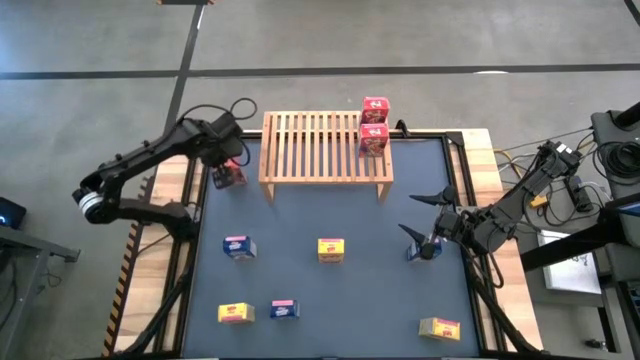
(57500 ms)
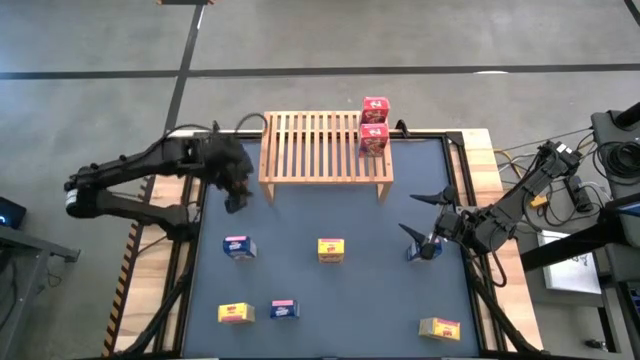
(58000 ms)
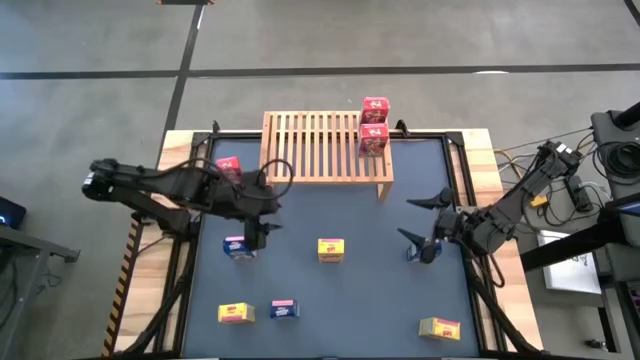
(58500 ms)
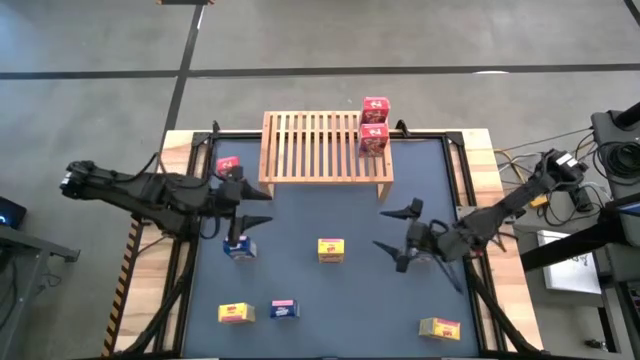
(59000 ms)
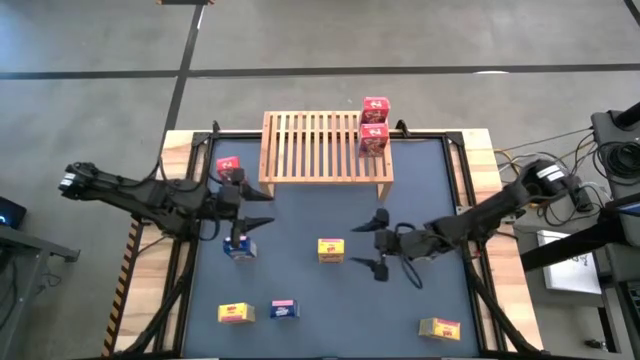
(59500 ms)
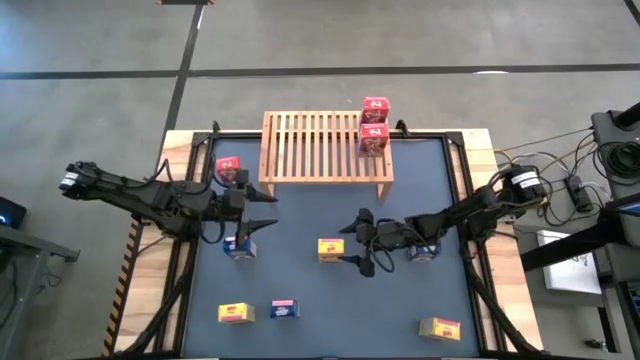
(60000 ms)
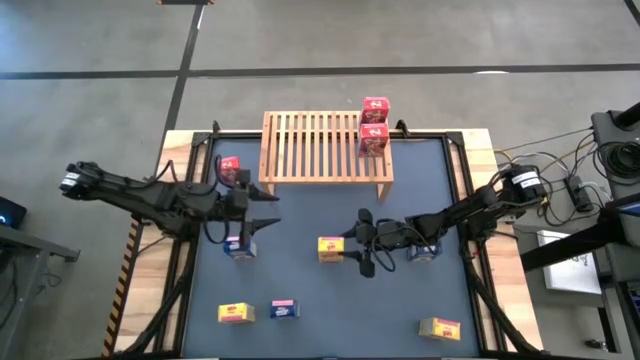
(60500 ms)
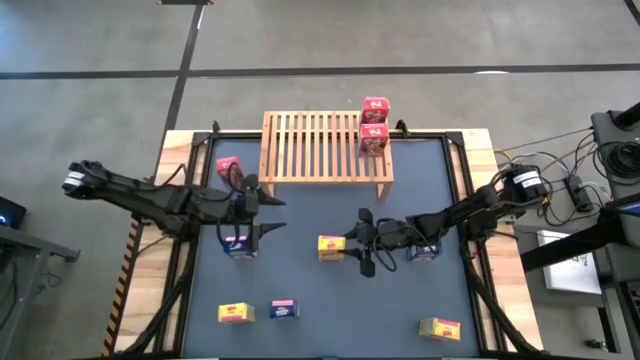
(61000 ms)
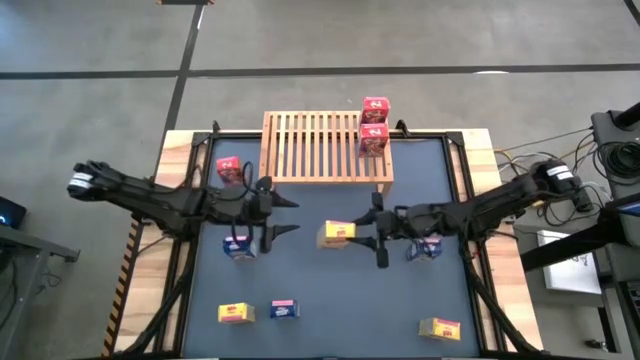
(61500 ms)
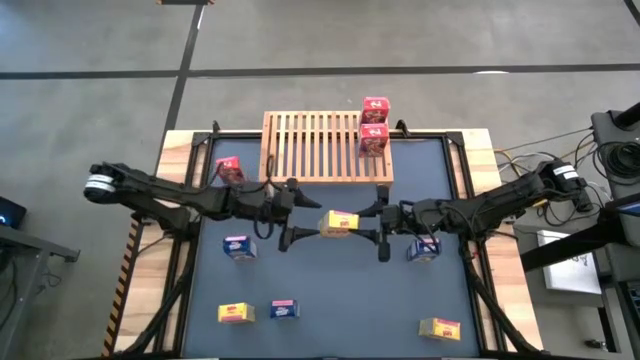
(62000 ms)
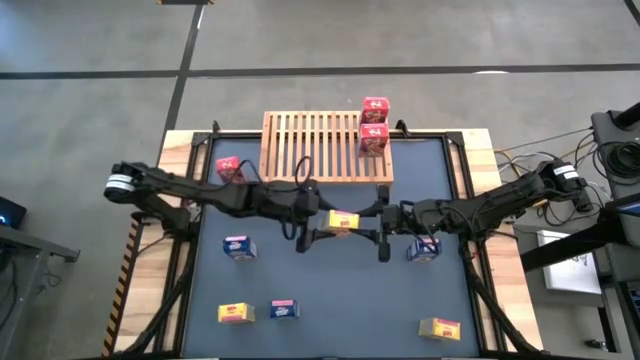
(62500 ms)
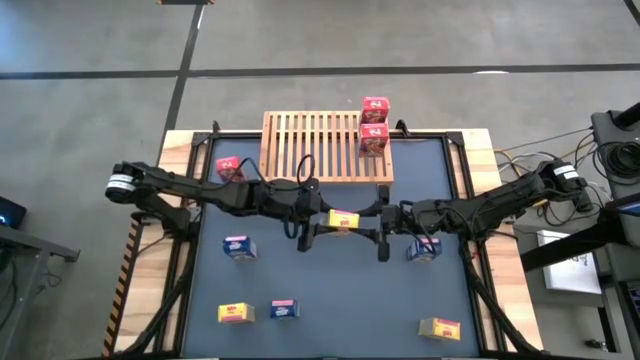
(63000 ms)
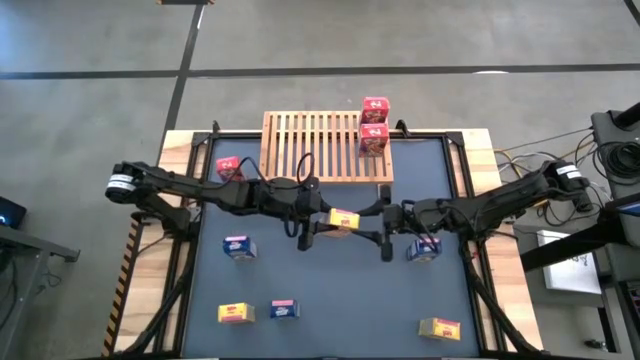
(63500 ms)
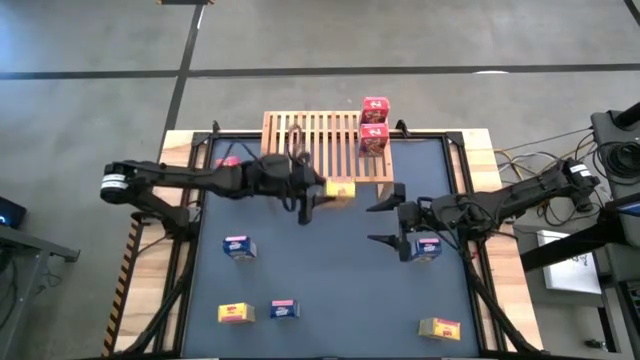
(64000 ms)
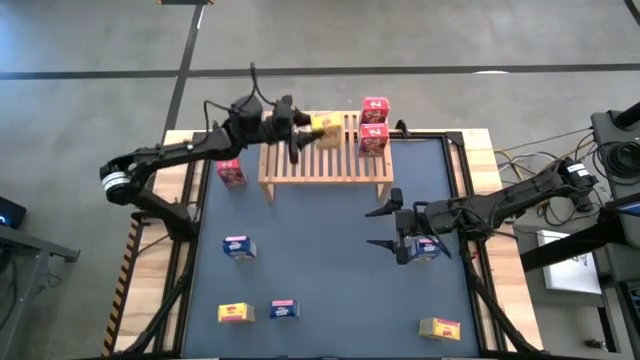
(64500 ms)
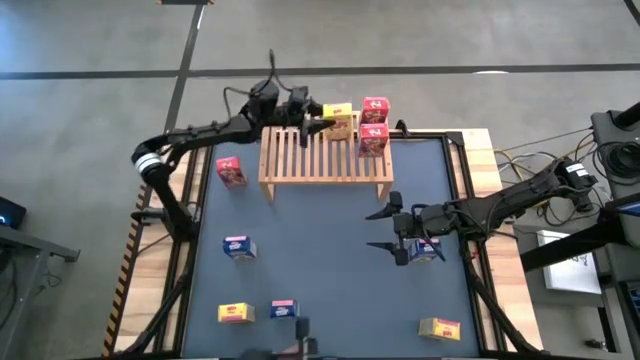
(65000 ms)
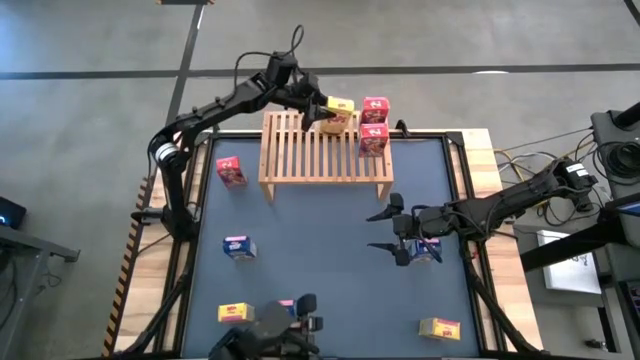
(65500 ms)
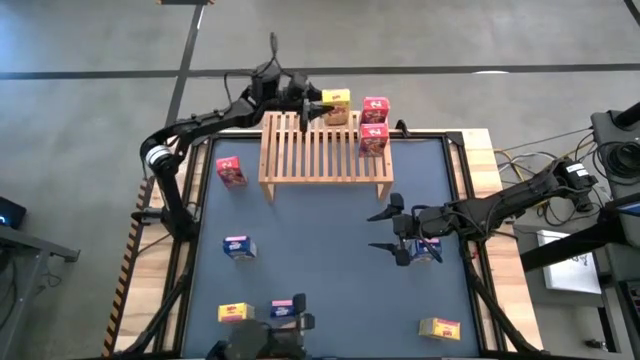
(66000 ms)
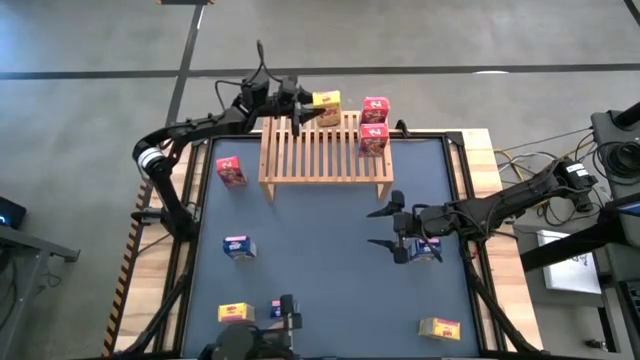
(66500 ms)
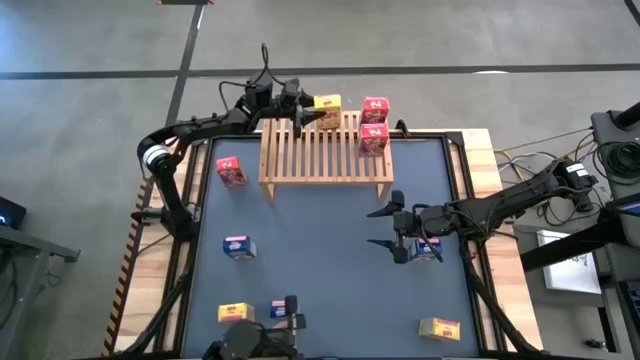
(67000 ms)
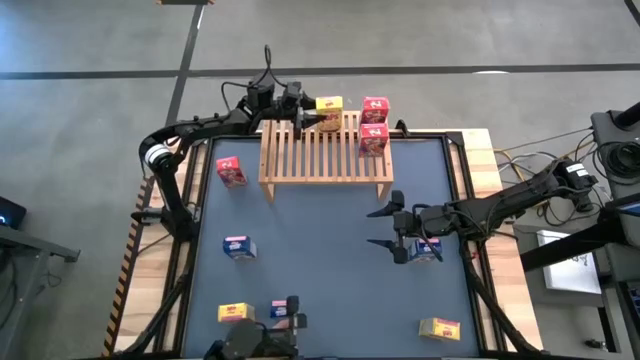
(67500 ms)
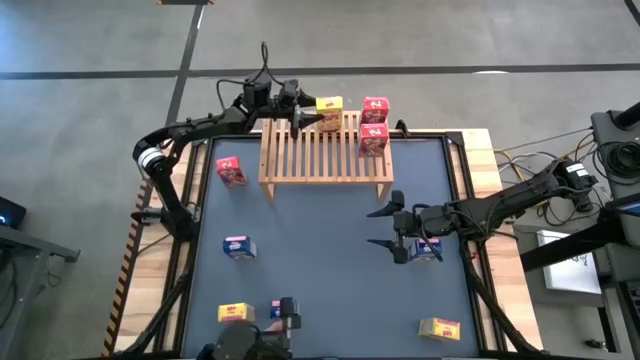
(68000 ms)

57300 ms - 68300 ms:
Task: Stack cereal on shelf
Put the top yellow cereal box on the shelf

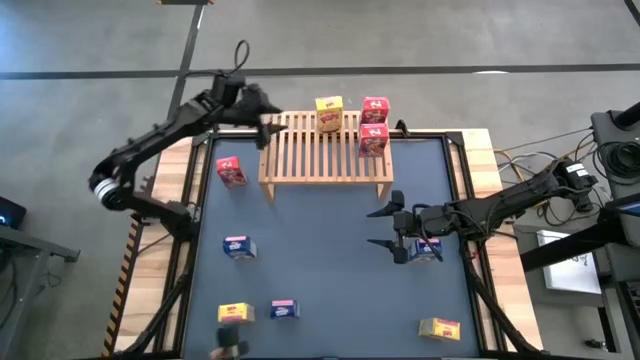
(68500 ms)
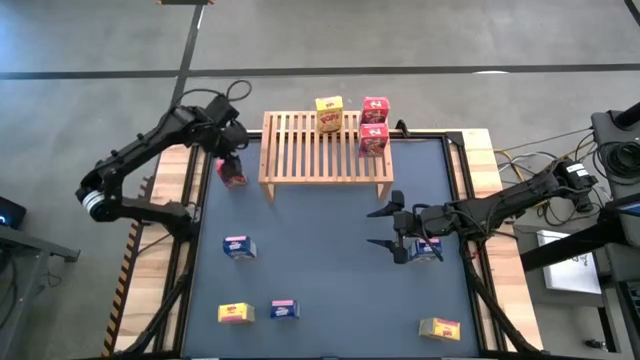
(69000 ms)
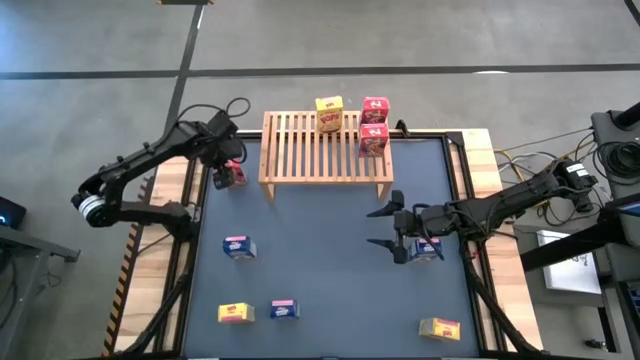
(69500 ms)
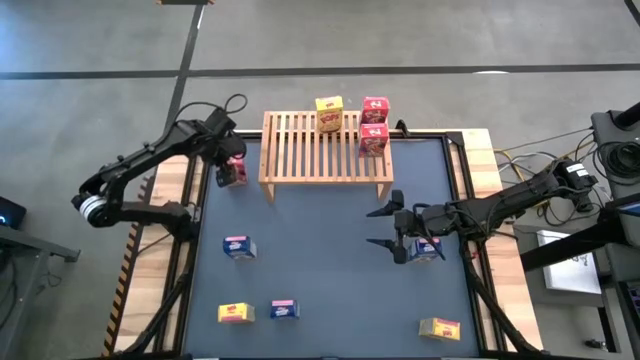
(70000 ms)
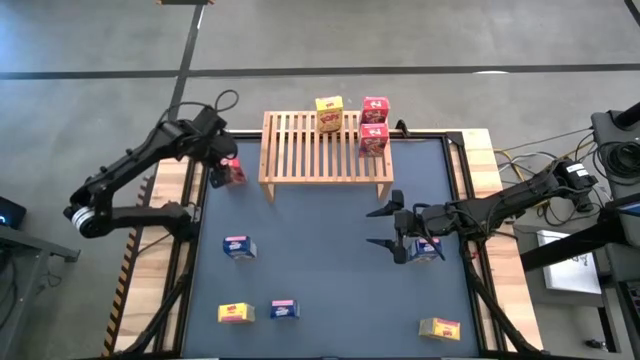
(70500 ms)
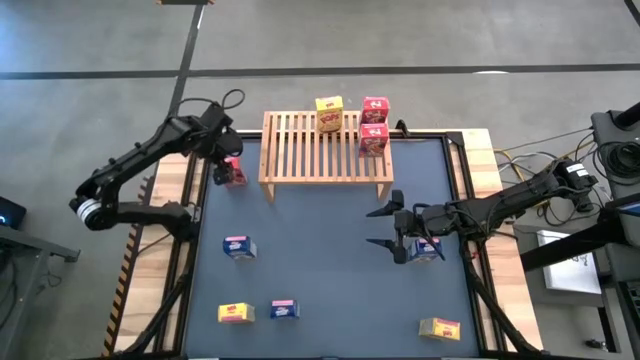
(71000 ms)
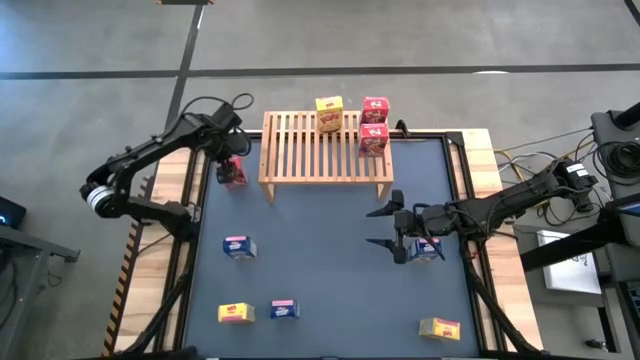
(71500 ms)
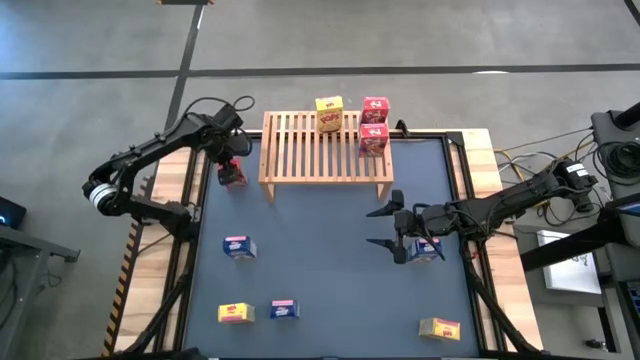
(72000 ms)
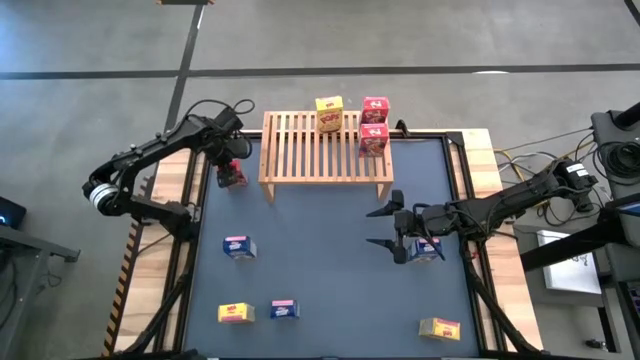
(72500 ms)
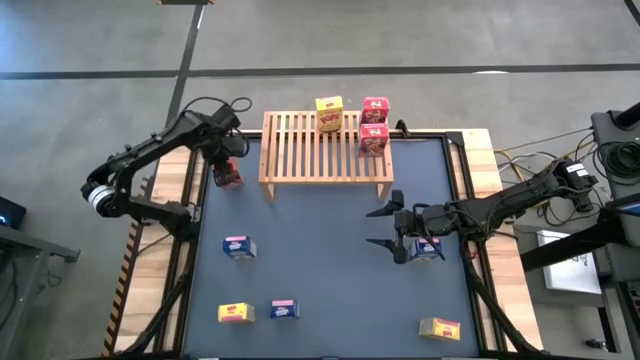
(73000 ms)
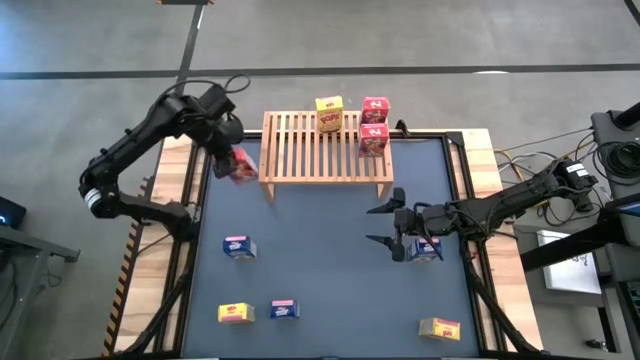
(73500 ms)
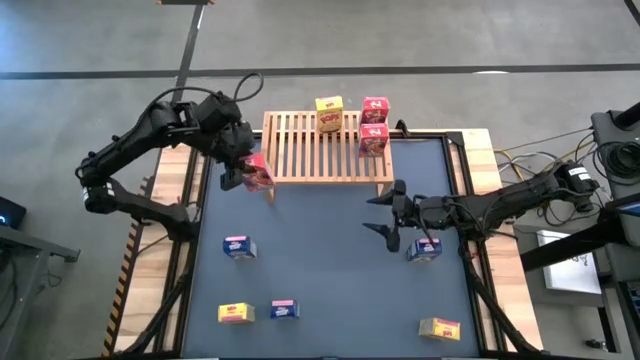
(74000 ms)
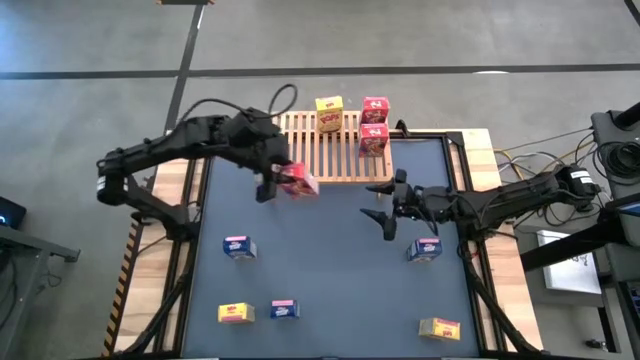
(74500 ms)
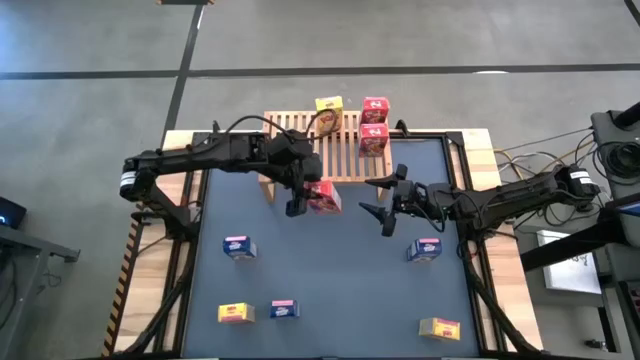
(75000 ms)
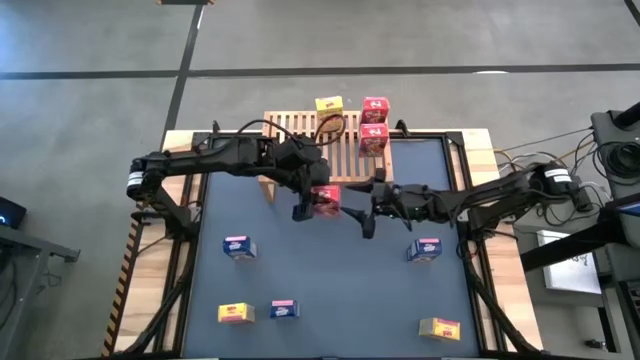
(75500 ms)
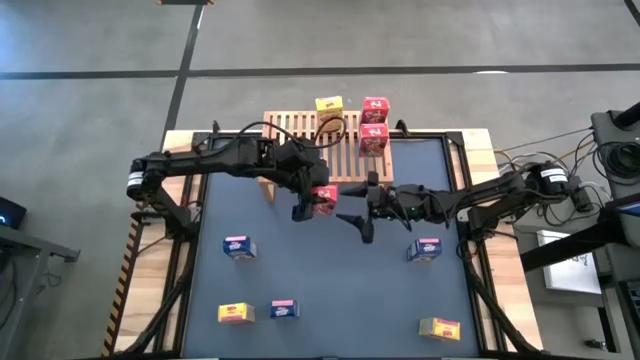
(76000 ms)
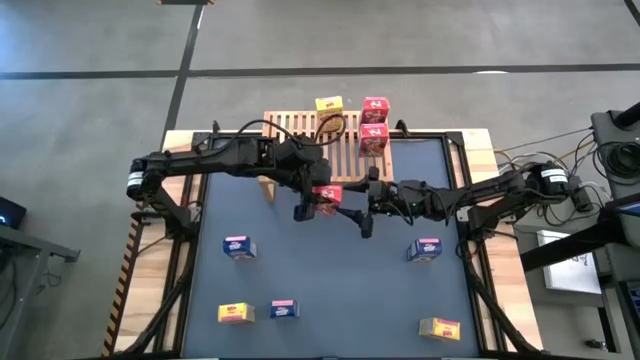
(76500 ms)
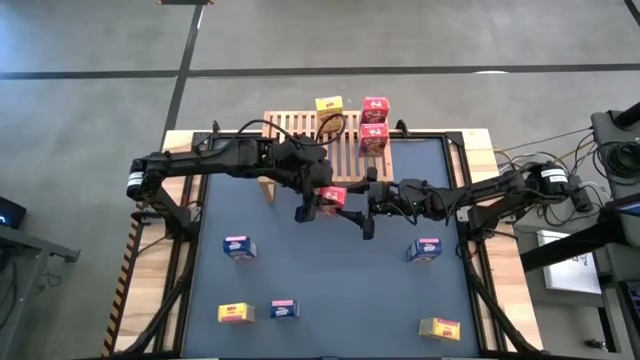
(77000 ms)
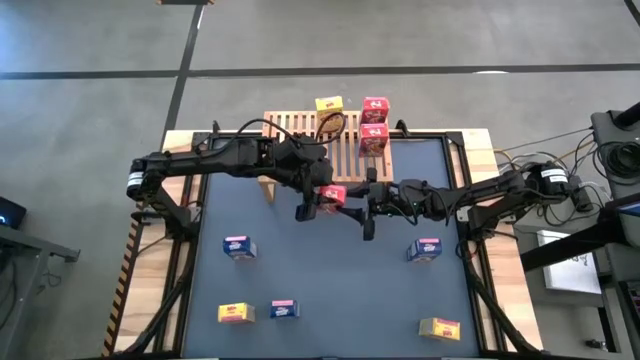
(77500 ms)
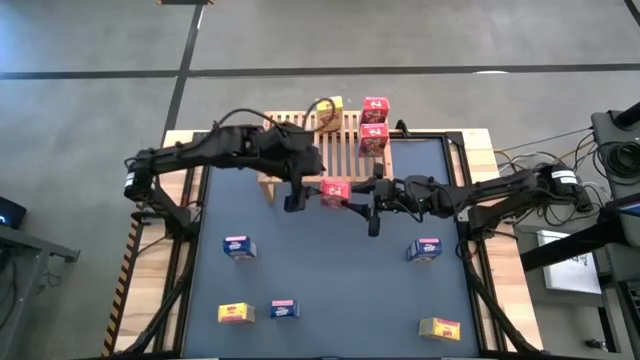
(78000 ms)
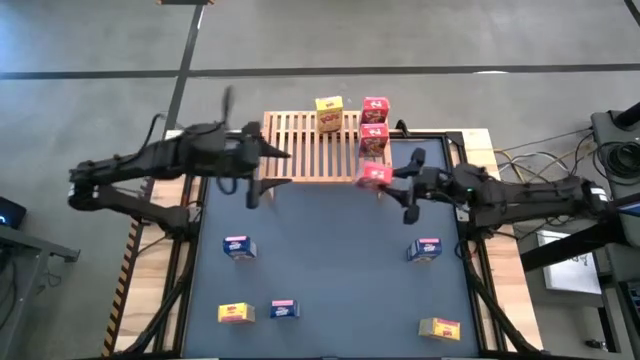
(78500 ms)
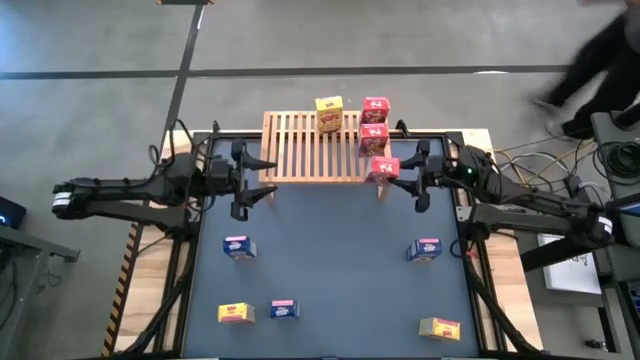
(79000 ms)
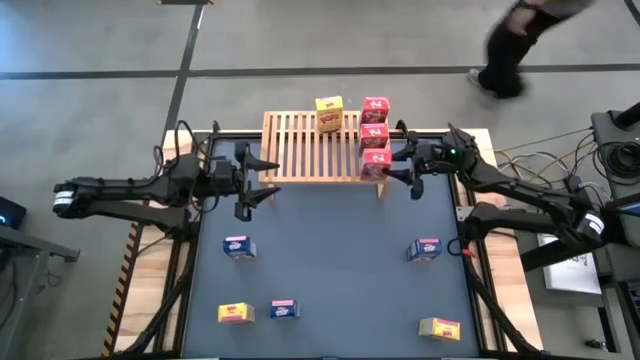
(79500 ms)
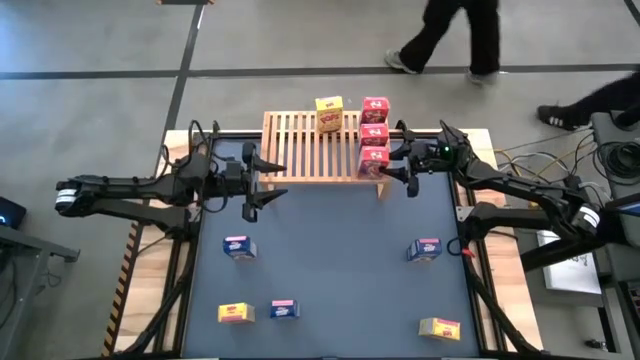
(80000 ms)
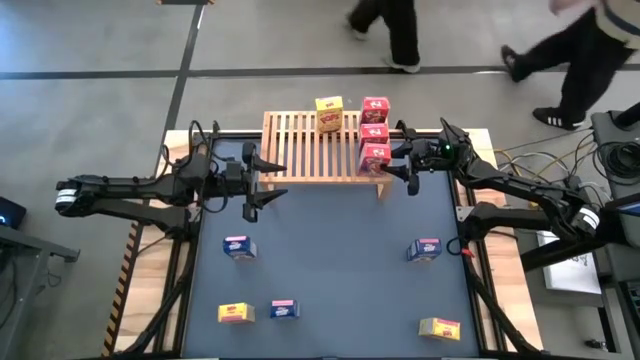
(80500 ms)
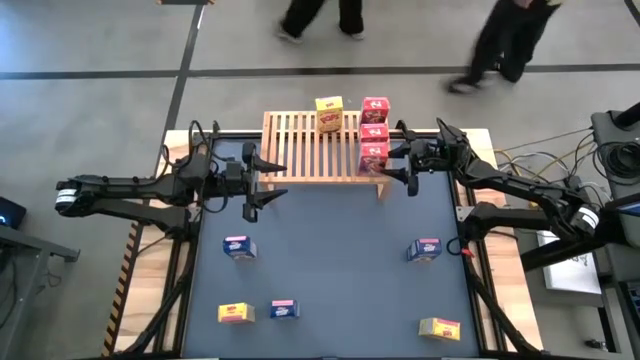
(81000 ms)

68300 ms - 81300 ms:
Put the red cereal box on the shelf aligned with the other red cereal boxes
